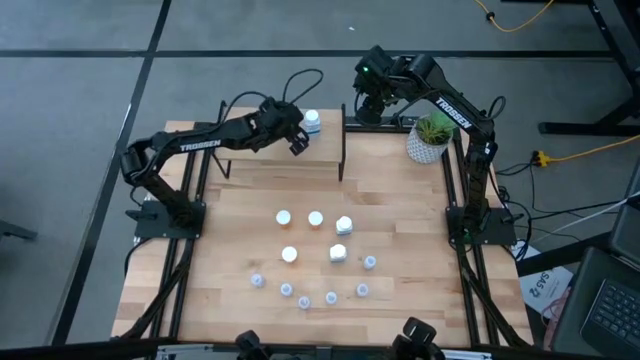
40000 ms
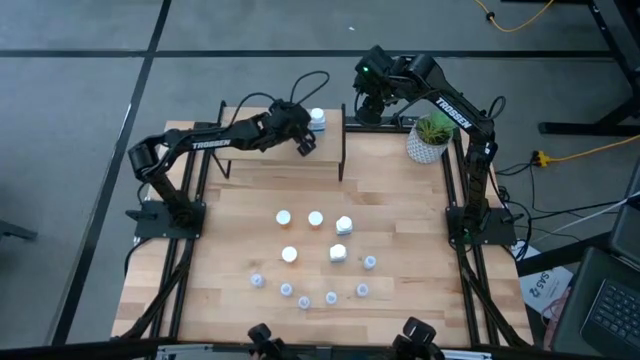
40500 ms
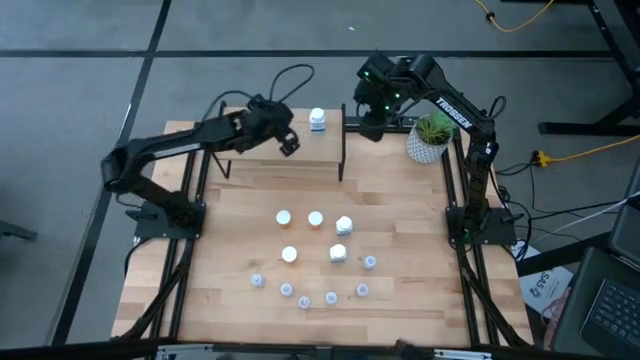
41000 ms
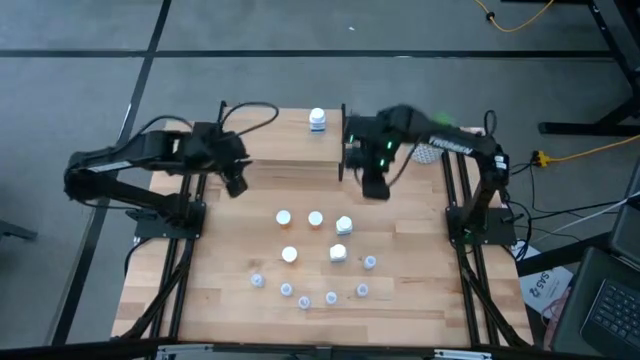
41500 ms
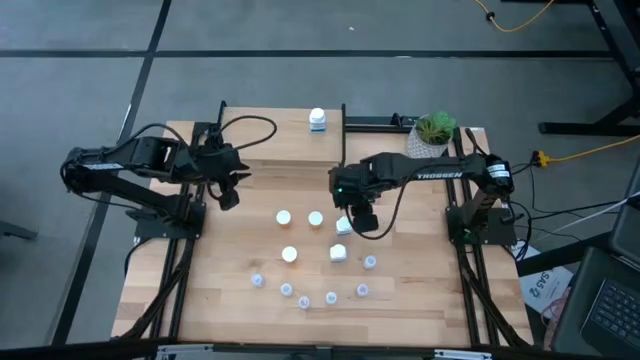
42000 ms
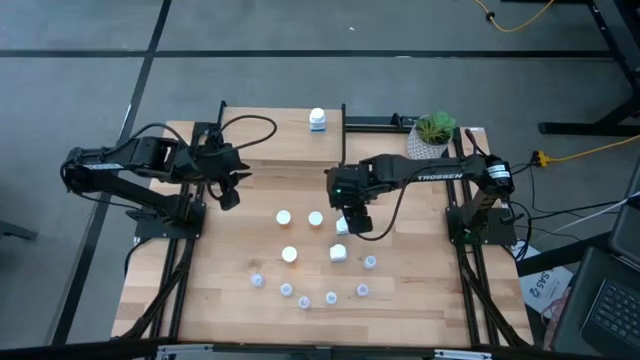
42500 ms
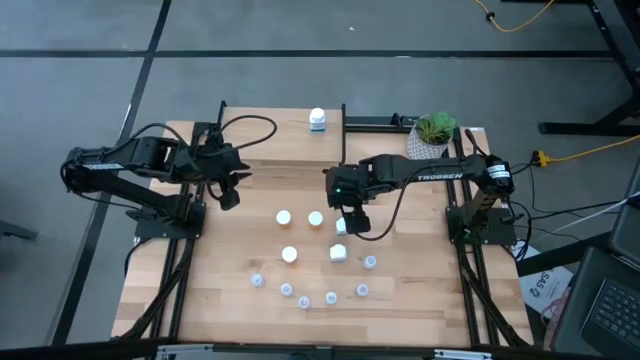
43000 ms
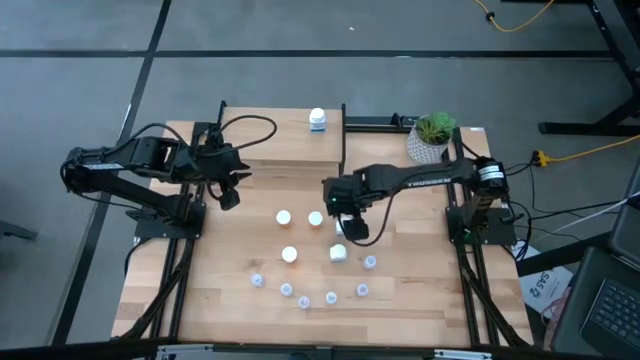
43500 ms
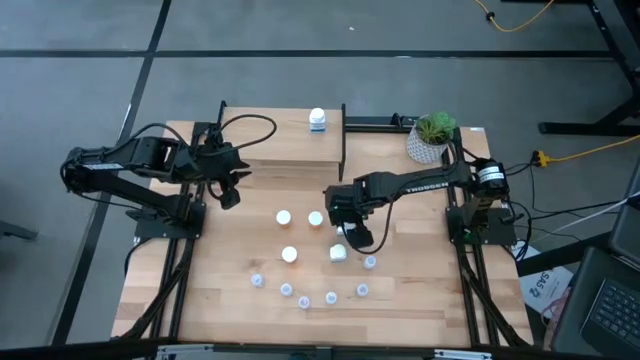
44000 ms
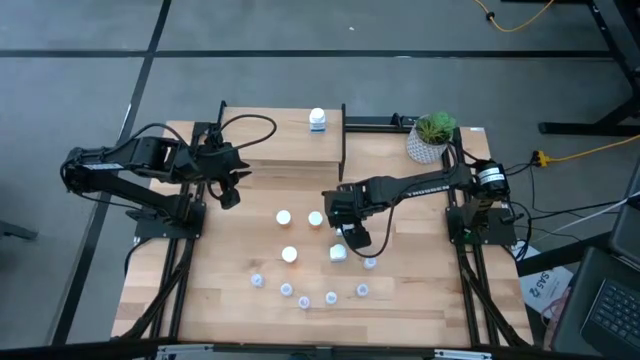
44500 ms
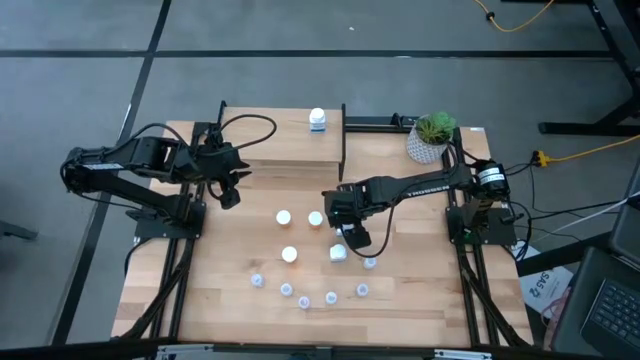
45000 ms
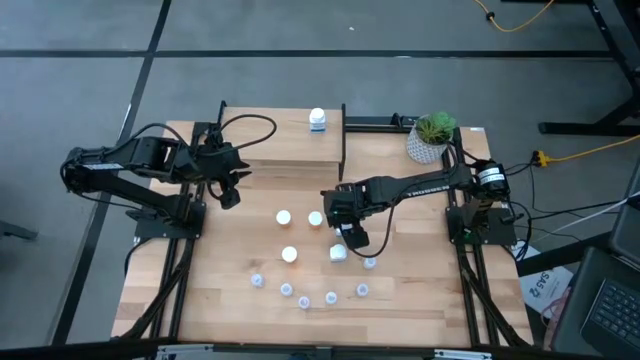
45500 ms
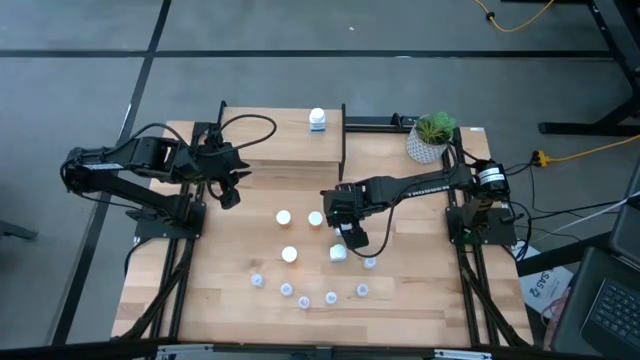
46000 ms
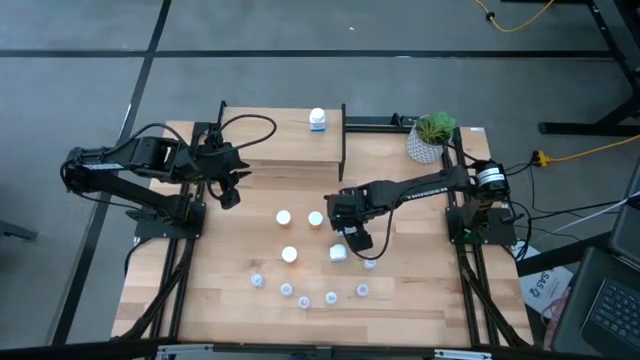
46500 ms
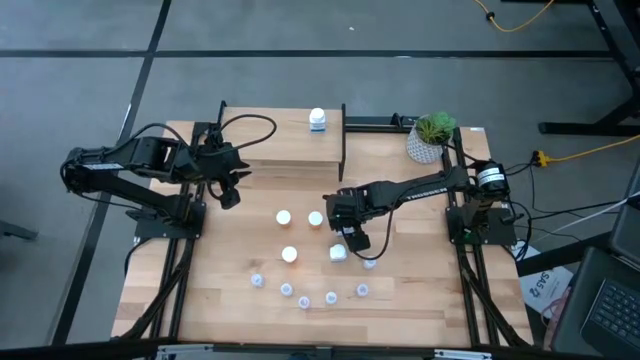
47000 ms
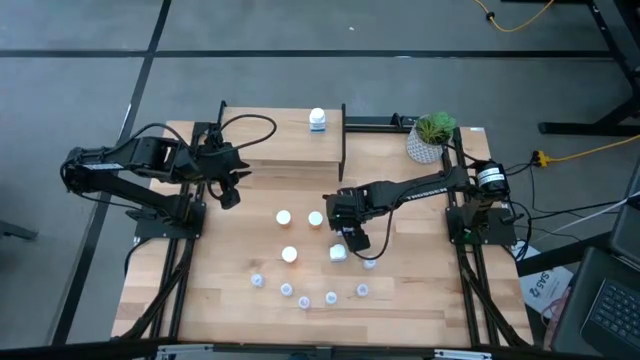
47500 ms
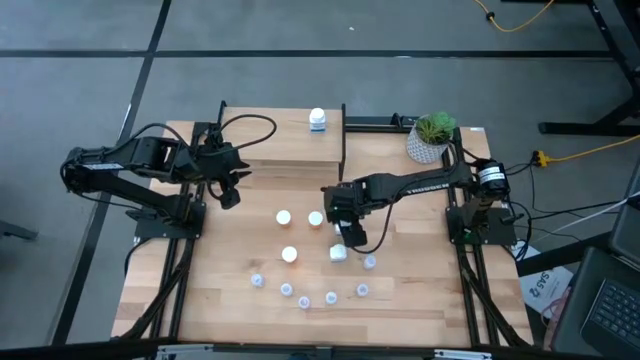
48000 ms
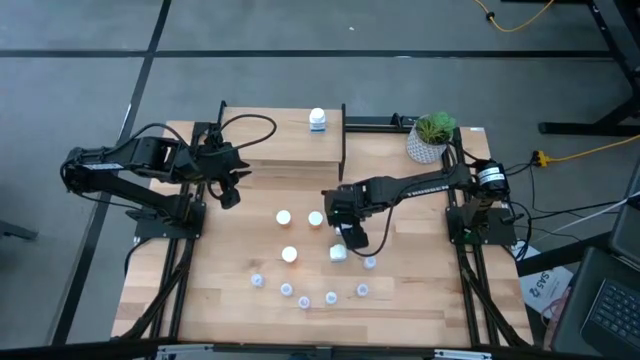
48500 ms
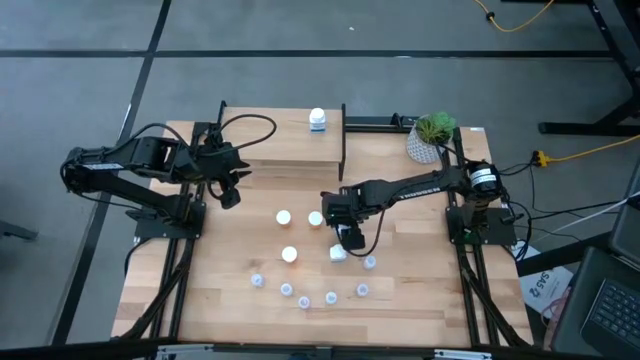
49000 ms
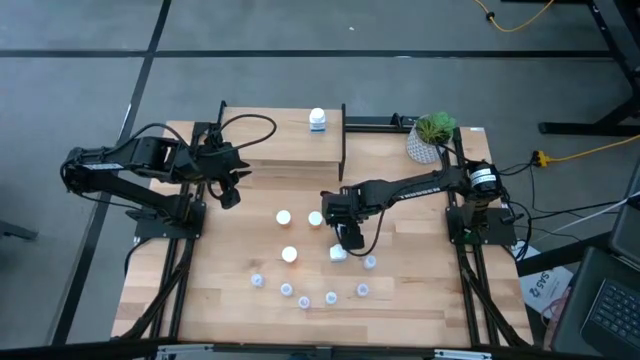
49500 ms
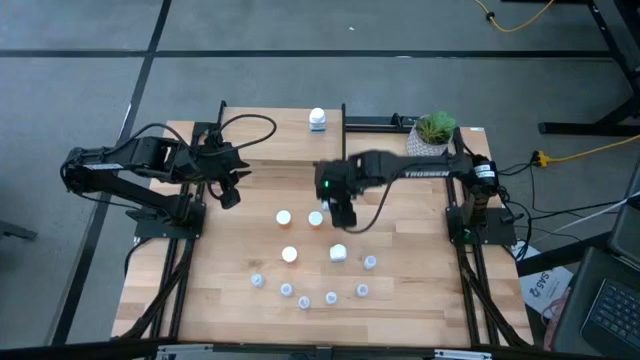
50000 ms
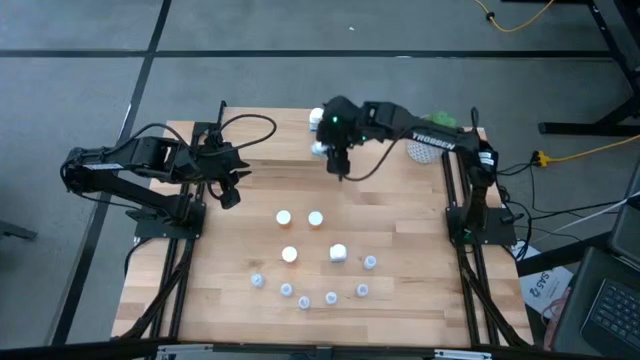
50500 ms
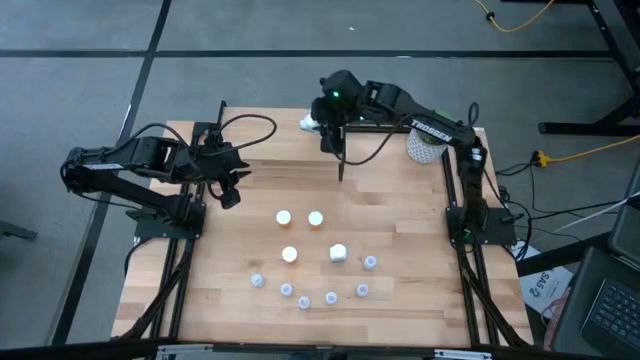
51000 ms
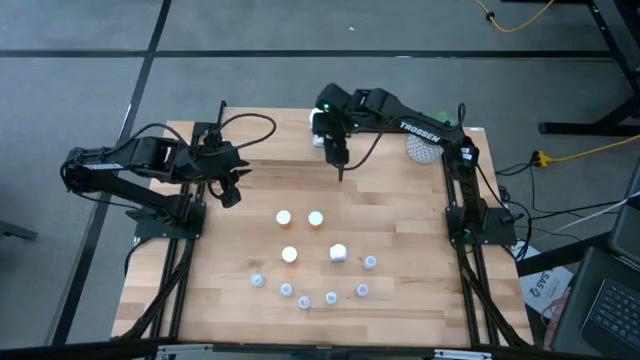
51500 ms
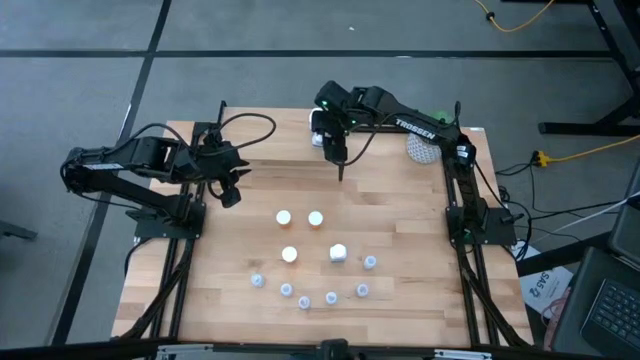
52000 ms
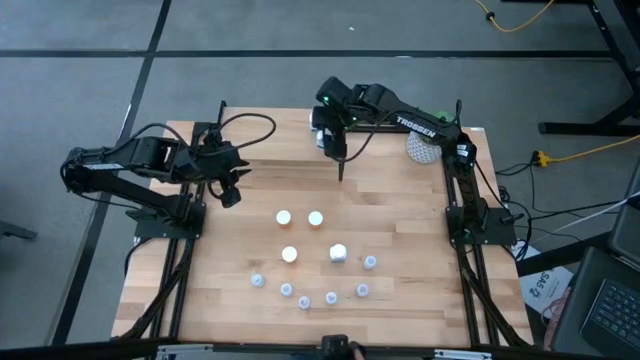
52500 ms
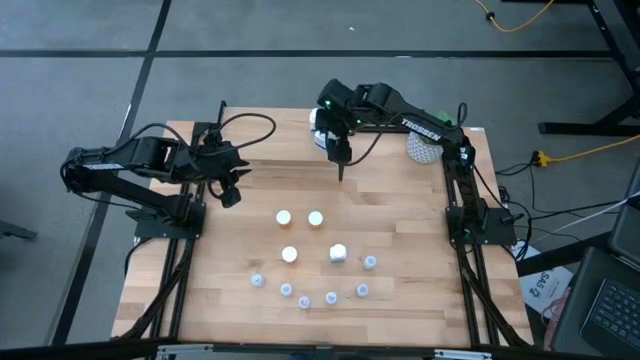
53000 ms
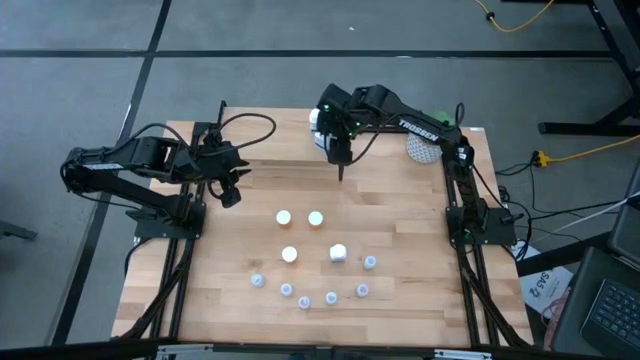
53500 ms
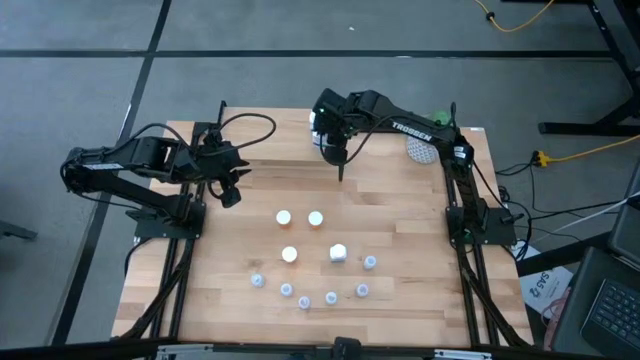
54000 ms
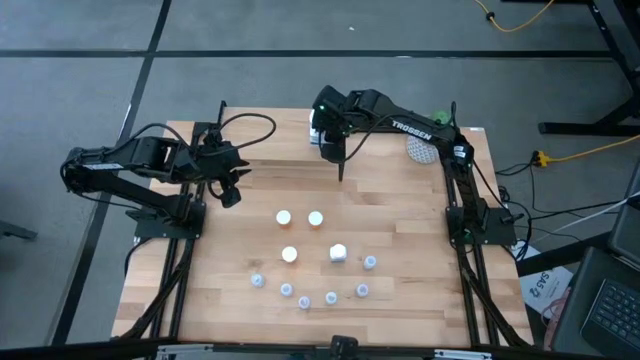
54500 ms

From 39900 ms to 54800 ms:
Task: Pick and place medicine bottles onto shelf by color
Put the top blue pill bottle on the shelf aligned with the blue pill bottle

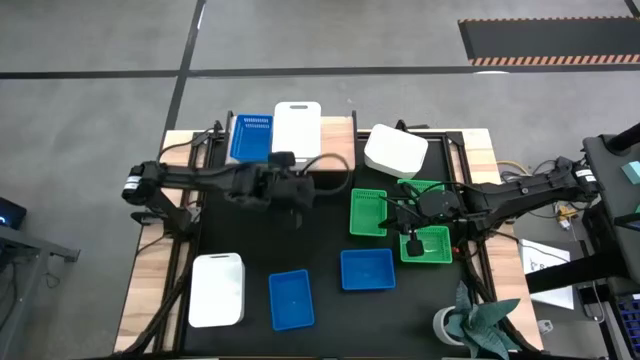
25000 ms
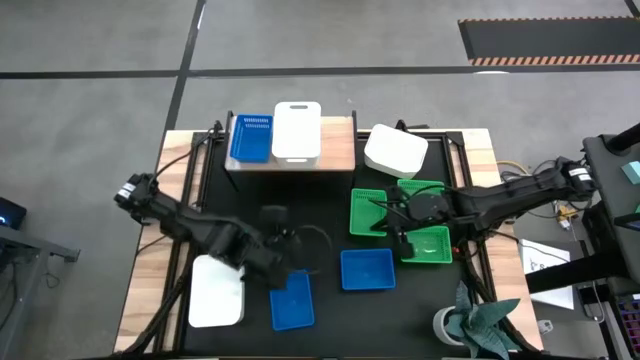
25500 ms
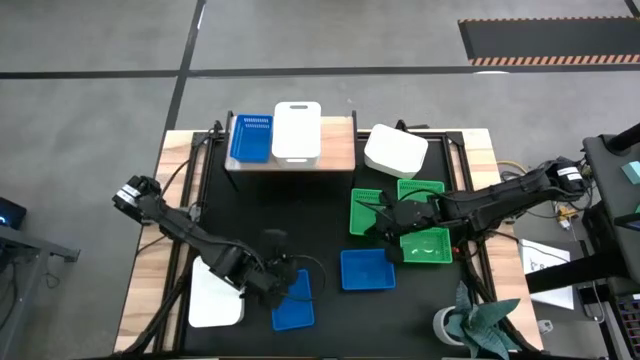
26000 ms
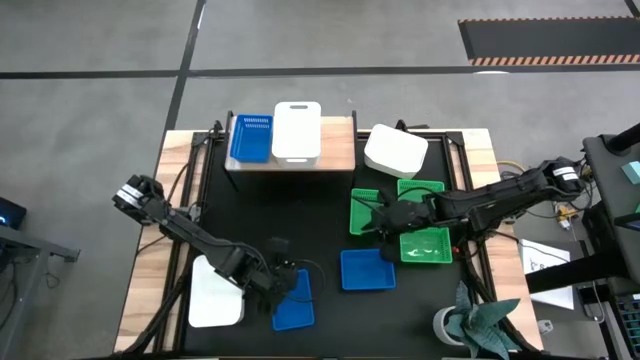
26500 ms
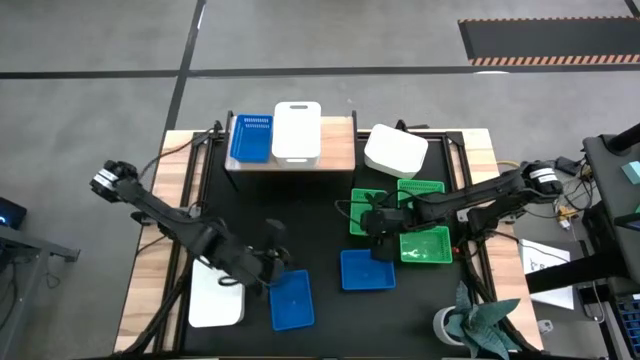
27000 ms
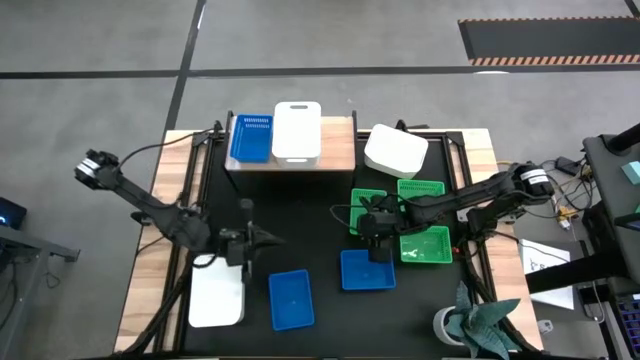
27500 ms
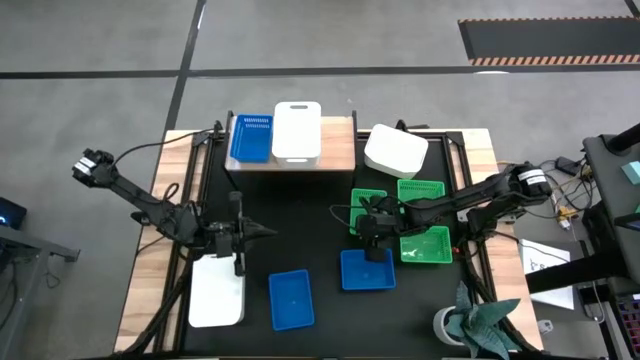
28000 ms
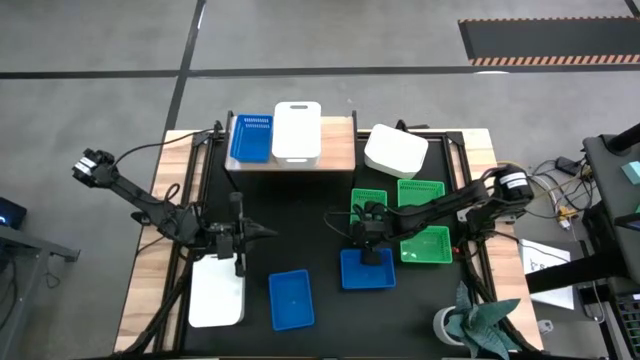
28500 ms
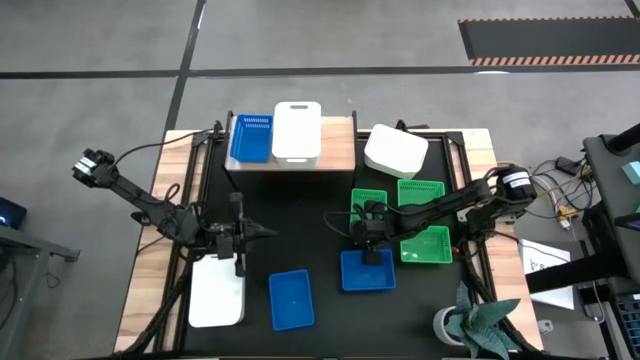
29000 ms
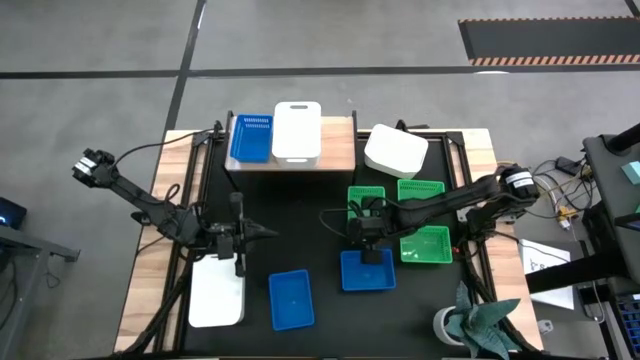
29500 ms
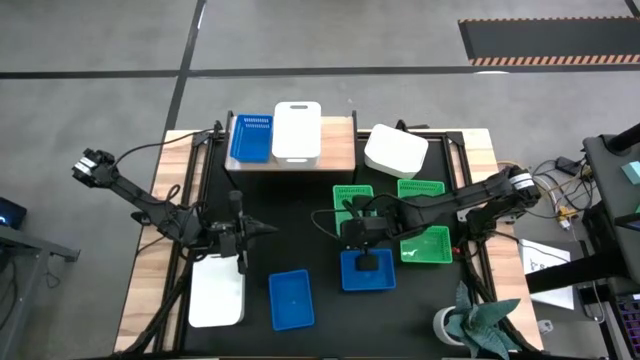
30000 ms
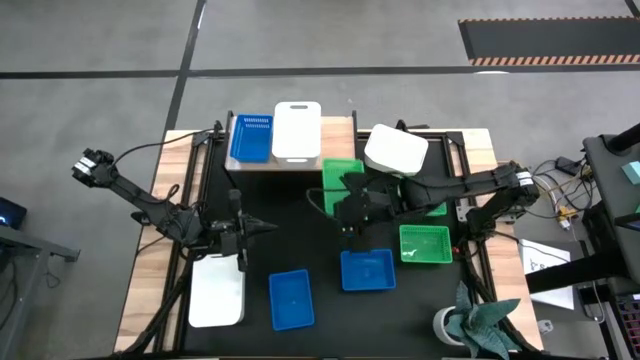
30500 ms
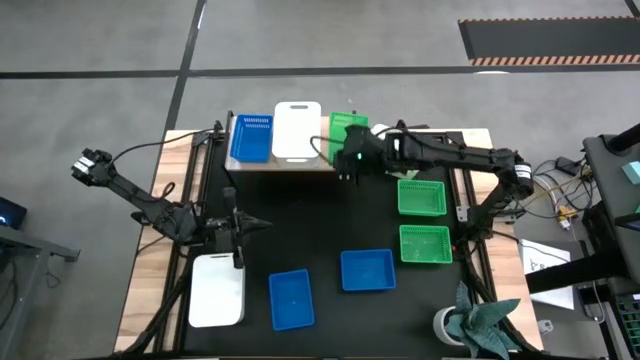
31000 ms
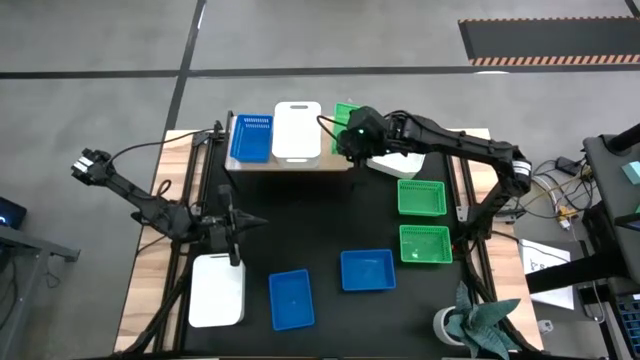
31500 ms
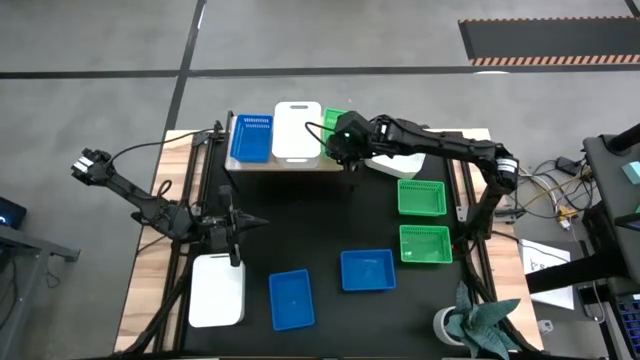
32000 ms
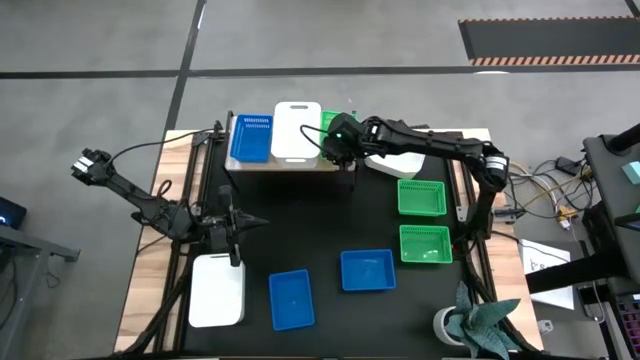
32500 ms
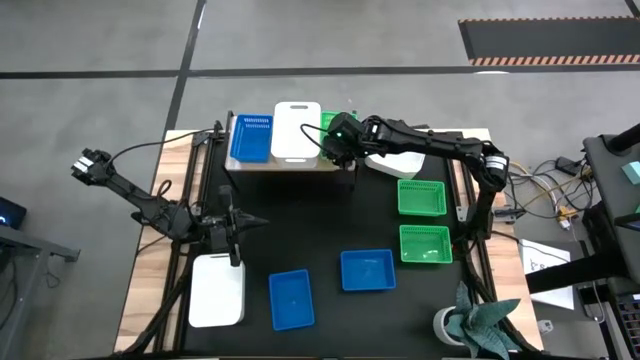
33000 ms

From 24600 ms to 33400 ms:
Task: Stack baskets on shelf by color
Put the middle green bin on the shelf
